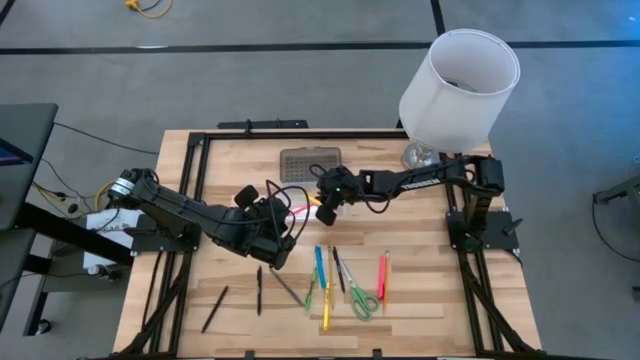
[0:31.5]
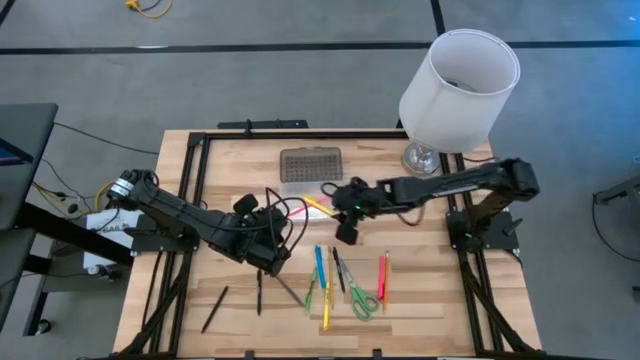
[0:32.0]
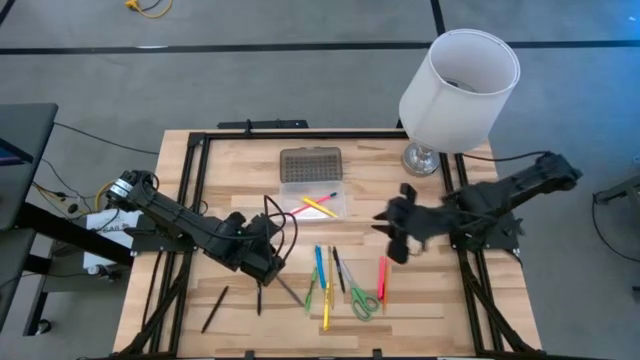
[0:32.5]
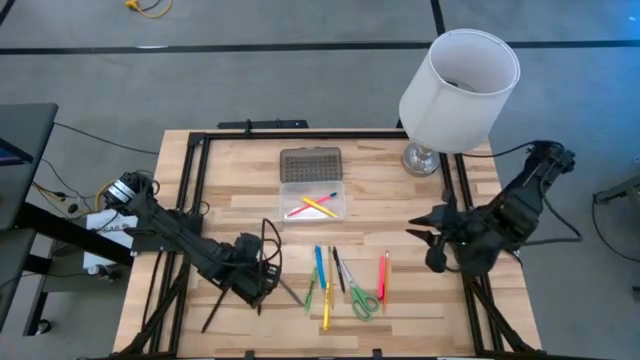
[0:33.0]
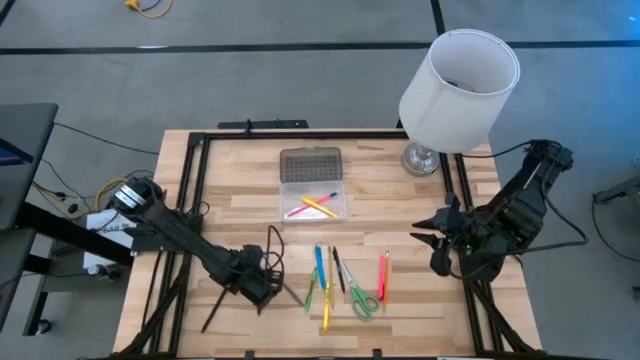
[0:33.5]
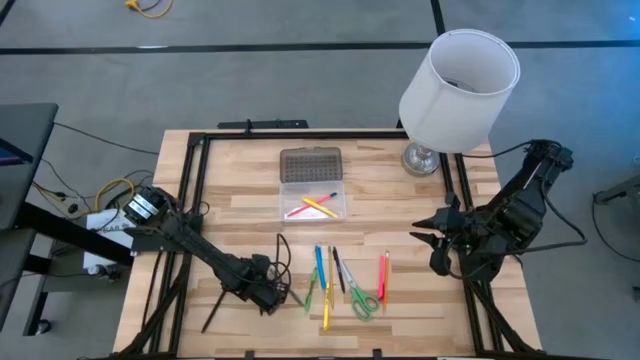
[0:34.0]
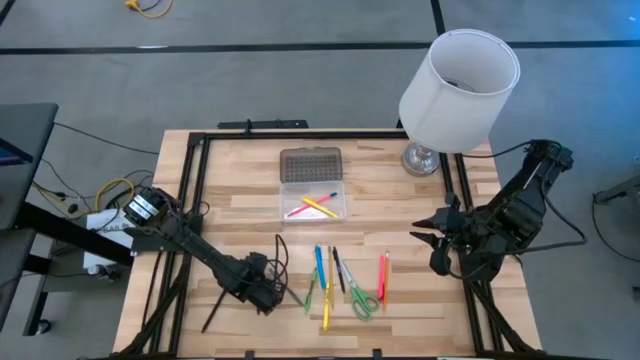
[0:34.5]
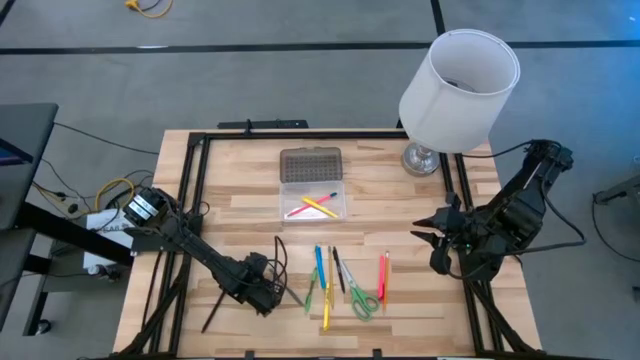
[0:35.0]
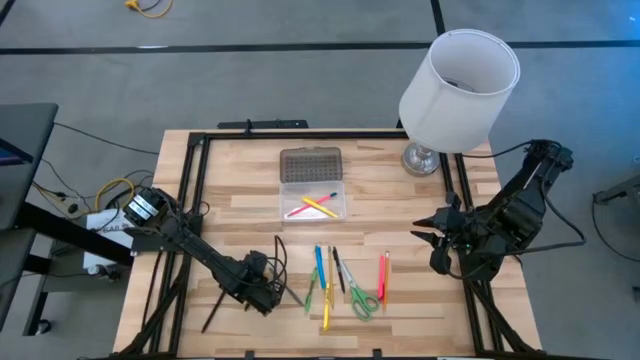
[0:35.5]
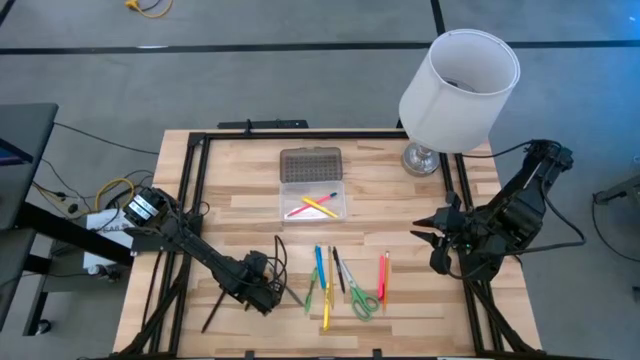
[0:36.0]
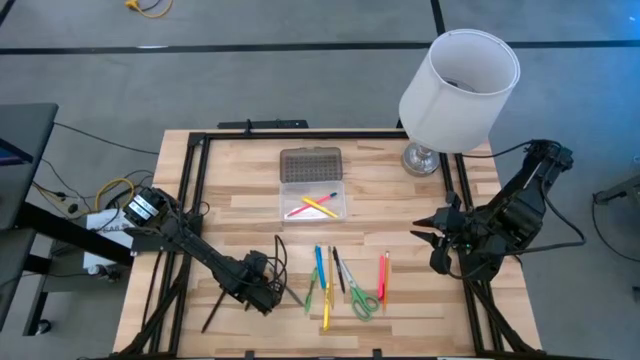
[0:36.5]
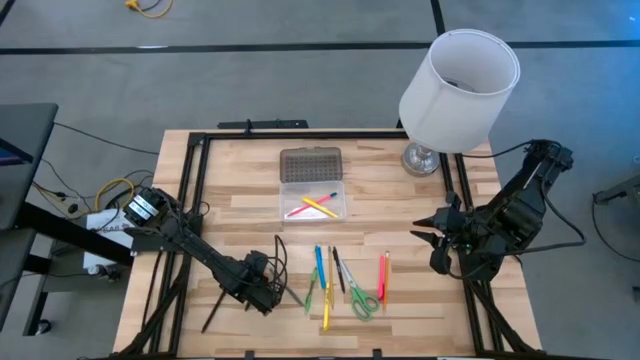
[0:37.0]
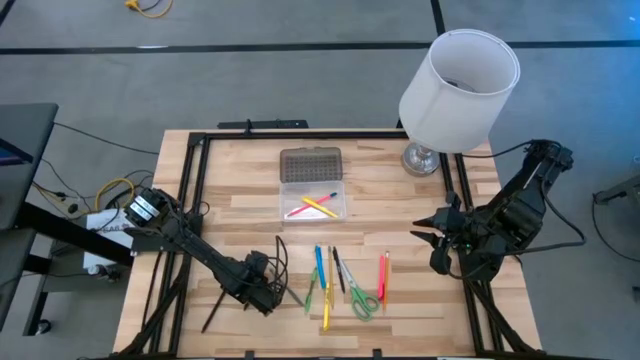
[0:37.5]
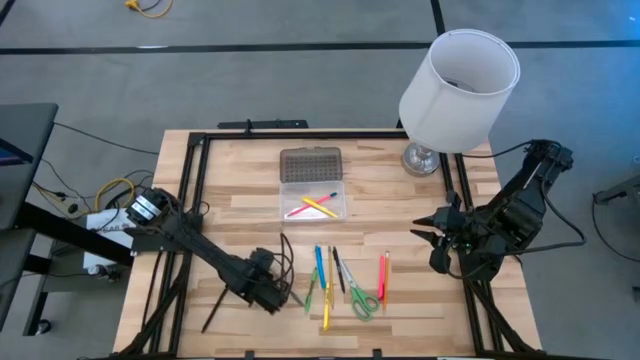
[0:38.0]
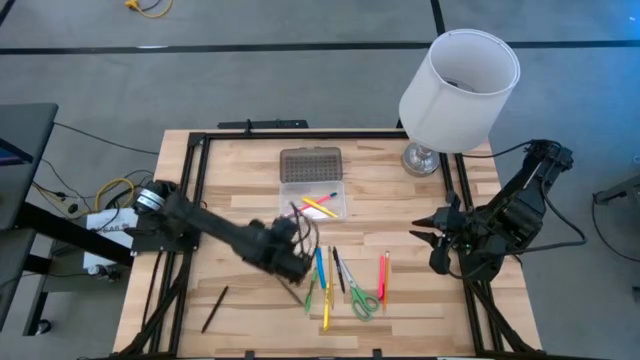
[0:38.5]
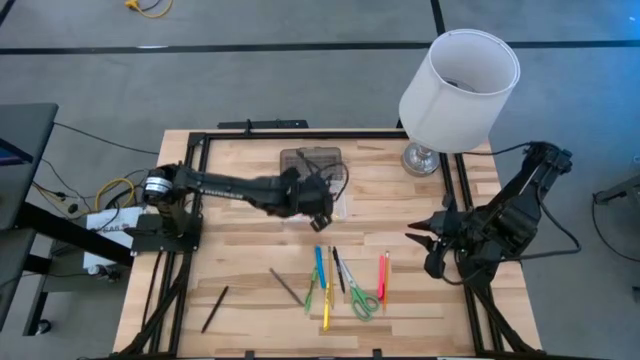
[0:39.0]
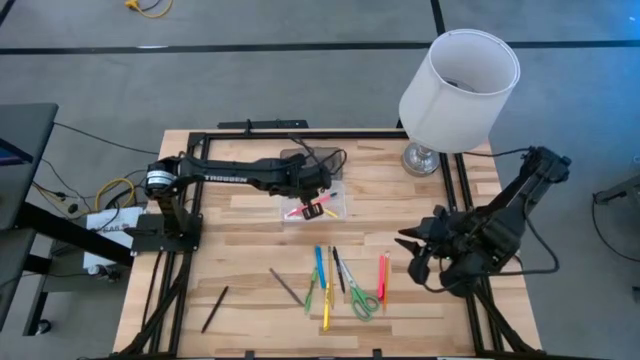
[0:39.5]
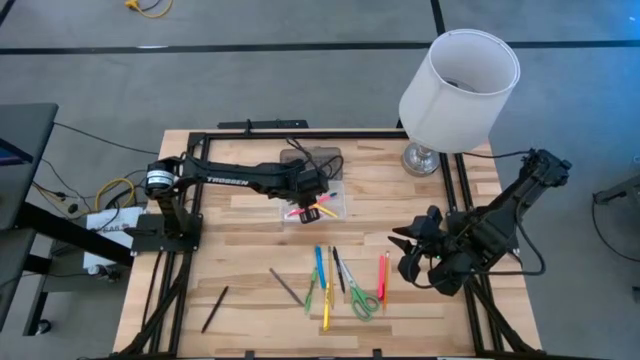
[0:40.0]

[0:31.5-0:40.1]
Task: Pick & place school supplies into a supply box
Put the middle black pen into the supply box

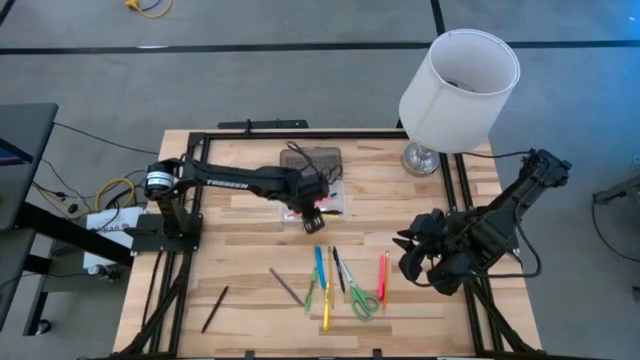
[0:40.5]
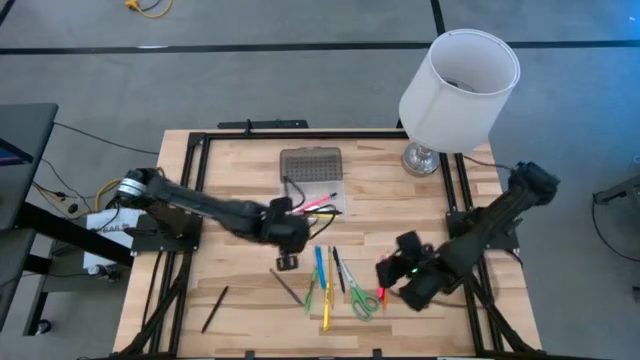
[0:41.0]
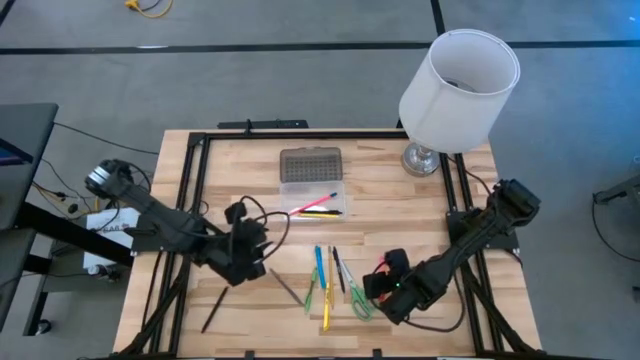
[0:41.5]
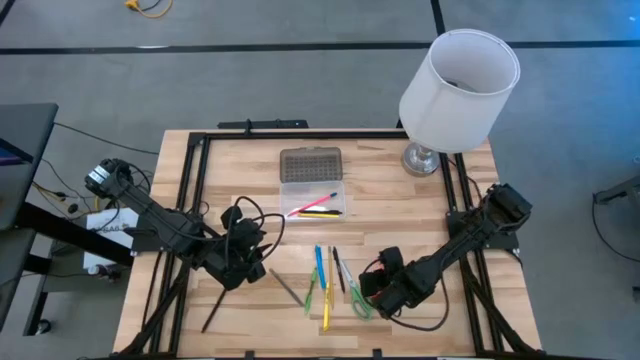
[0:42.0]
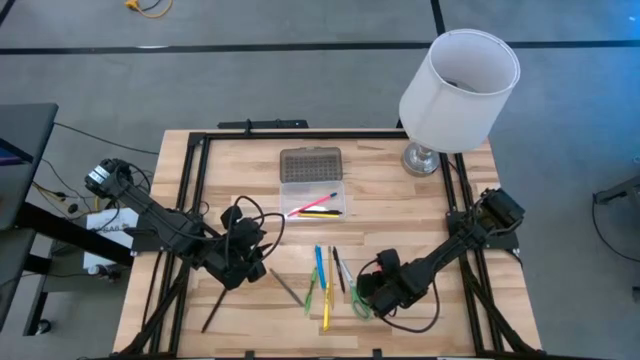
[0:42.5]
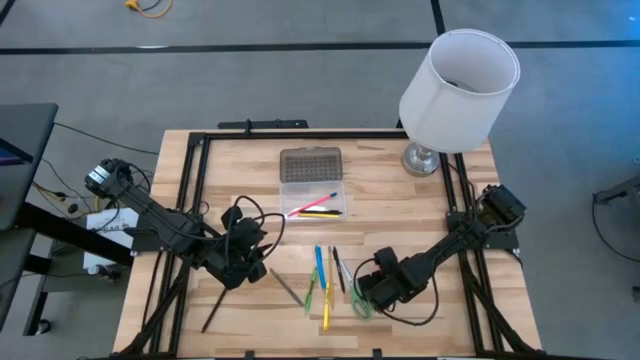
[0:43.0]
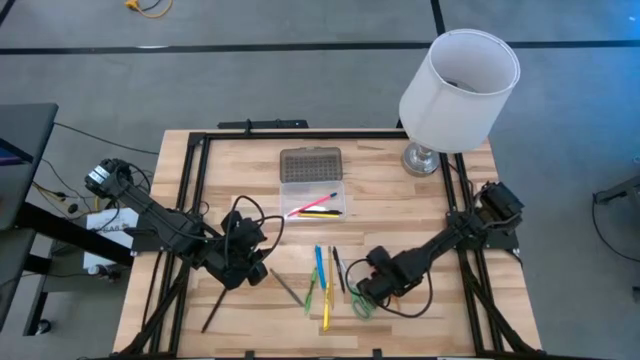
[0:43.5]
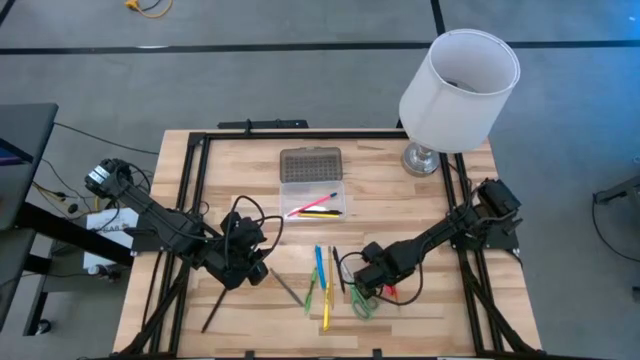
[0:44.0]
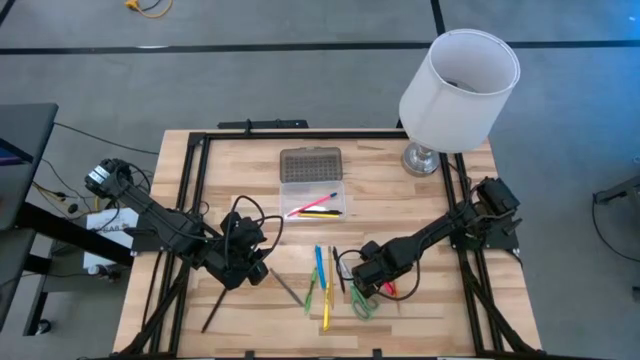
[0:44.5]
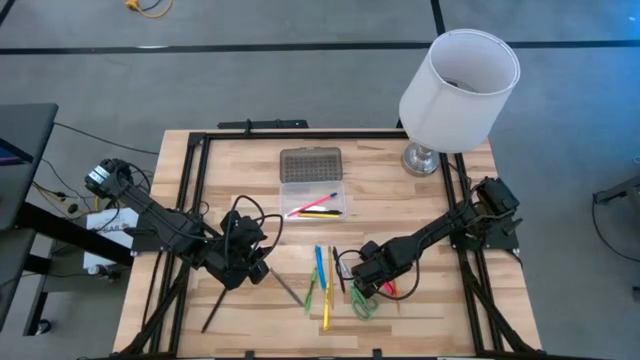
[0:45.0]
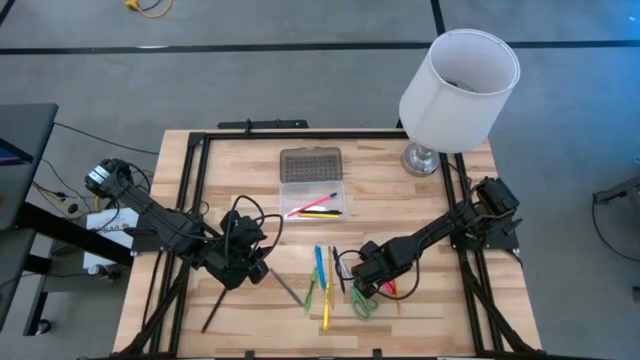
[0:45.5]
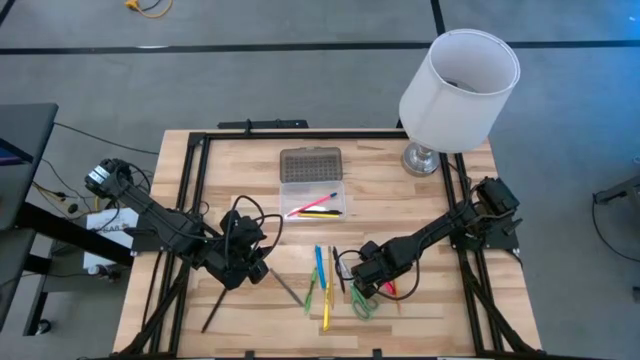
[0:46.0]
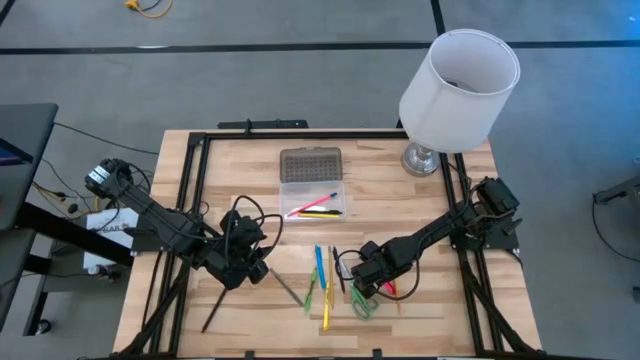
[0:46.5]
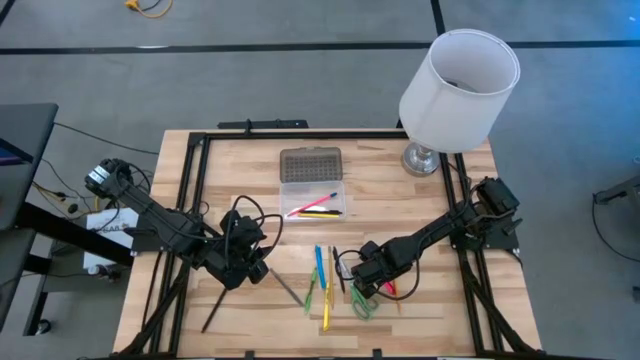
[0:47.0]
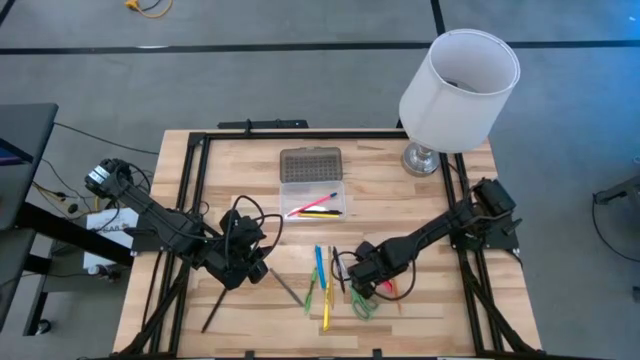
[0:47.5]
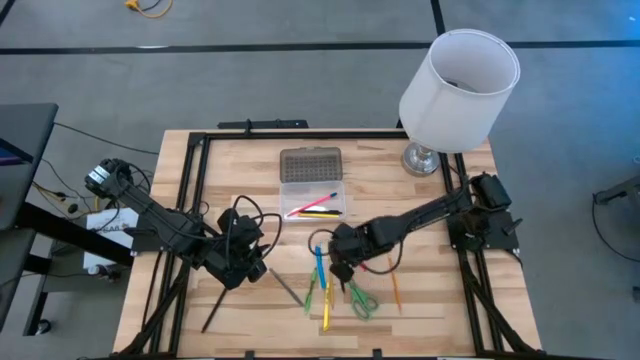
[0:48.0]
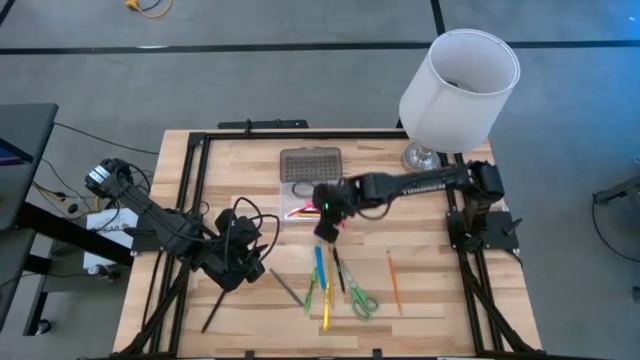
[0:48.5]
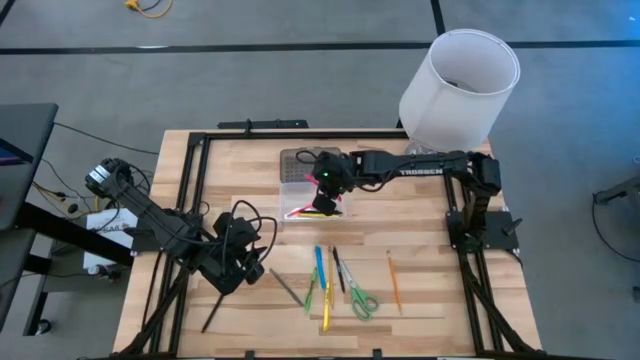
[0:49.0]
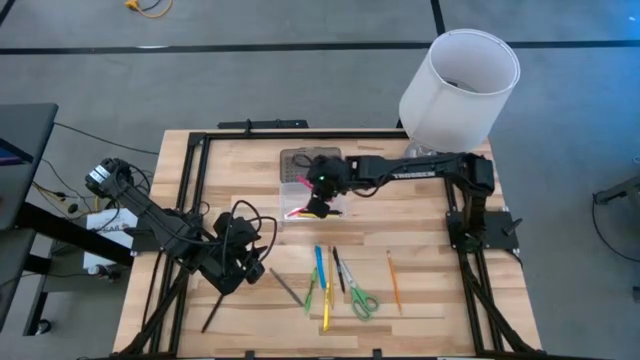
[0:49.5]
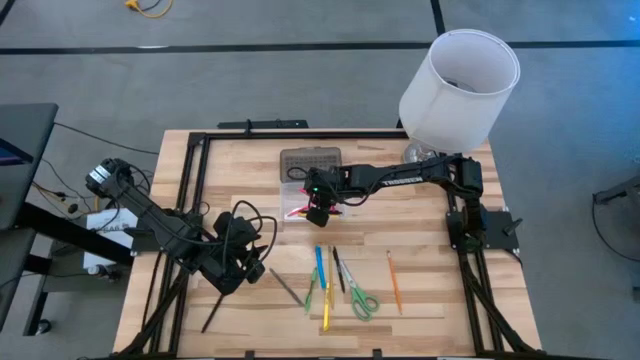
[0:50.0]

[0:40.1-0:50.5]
Put the pink marker pen into the supply box

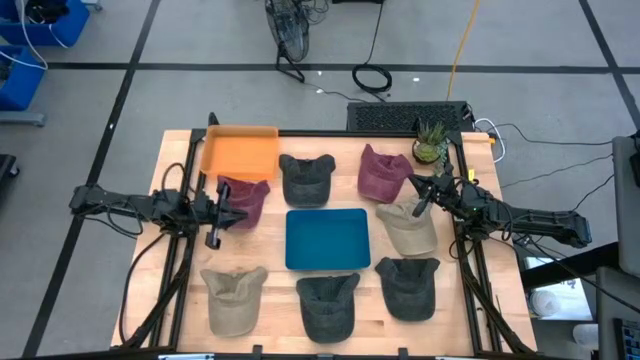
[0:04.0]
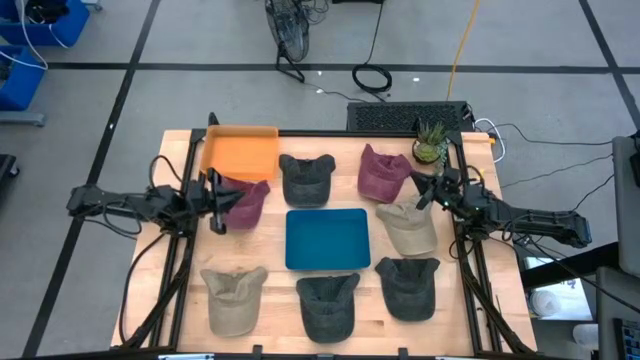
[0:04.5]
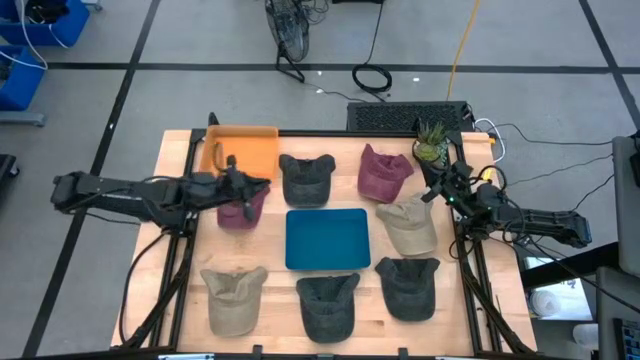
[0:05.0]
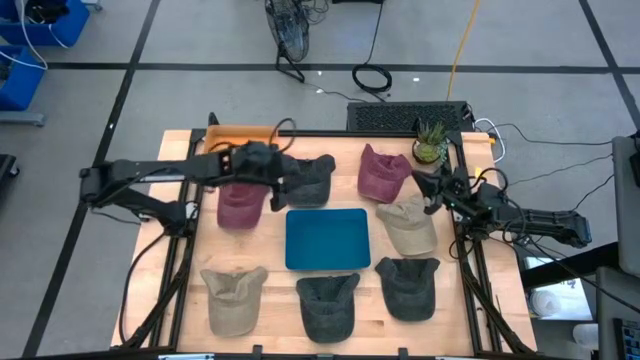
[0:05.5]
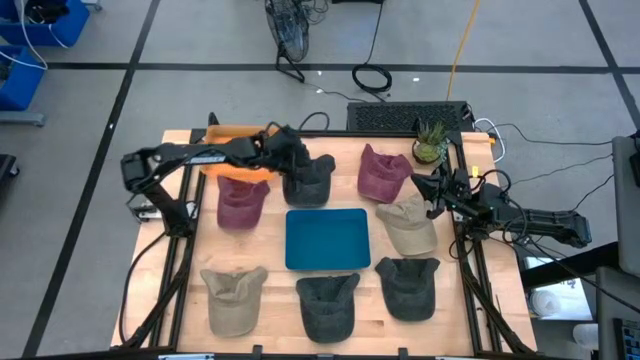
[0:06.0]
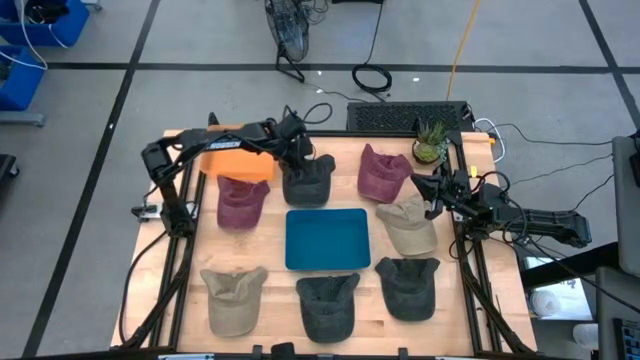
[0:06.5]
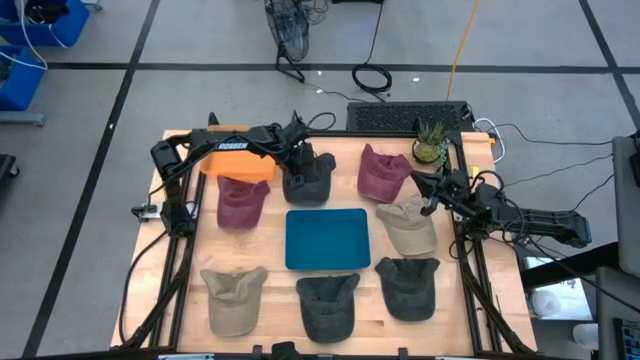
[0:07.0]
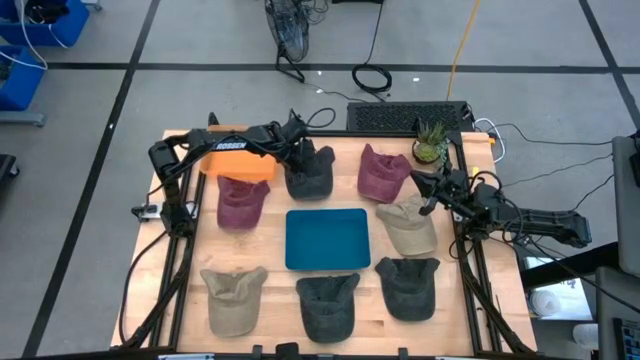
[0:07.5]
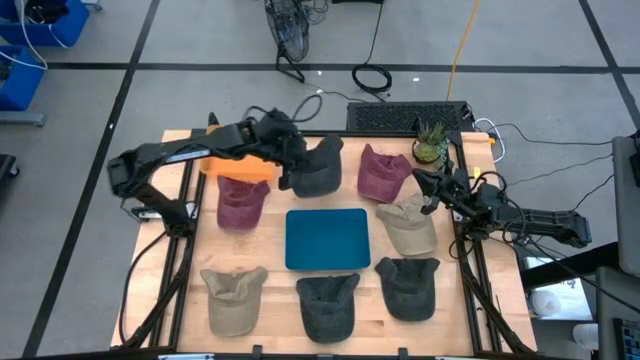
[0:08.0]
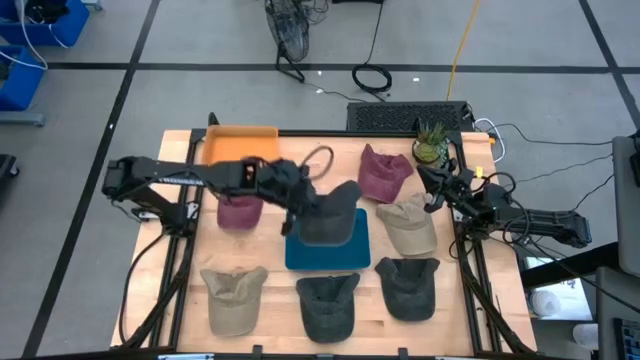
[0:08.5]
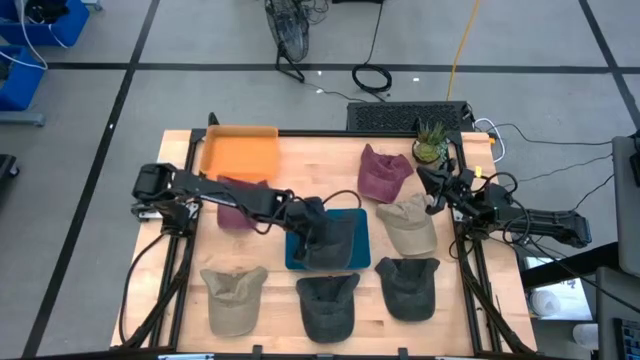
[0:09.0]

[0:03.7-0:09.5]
Task: Pick & Place hat
Put the top black cap into the blue bin
